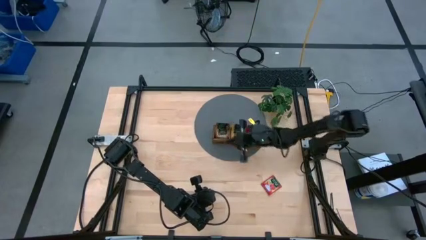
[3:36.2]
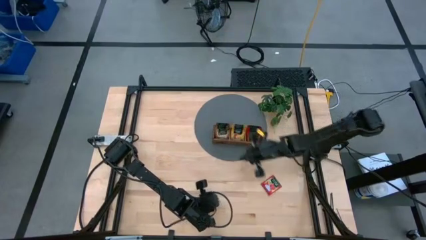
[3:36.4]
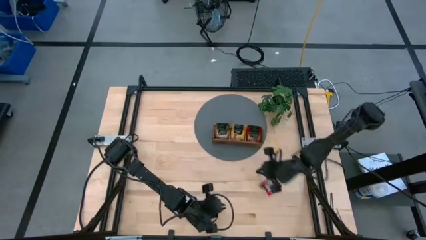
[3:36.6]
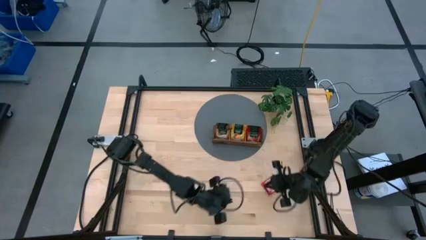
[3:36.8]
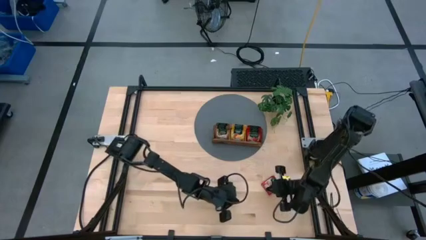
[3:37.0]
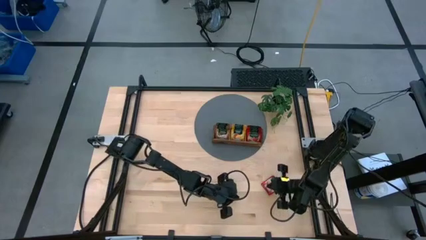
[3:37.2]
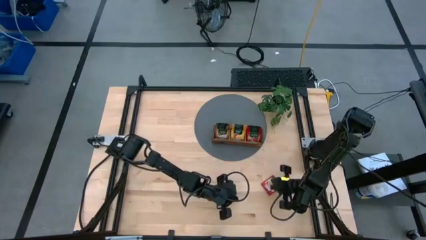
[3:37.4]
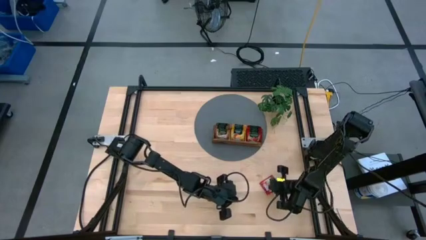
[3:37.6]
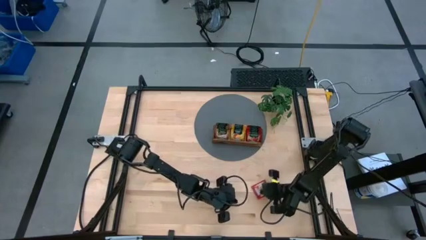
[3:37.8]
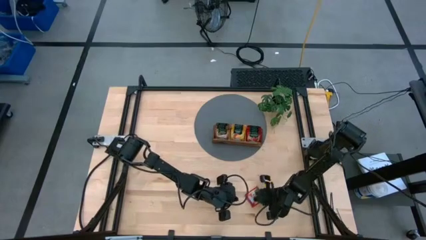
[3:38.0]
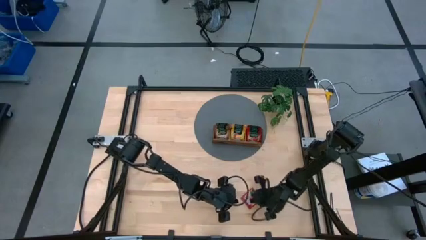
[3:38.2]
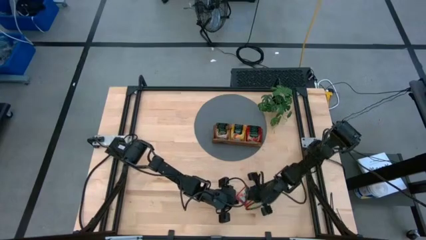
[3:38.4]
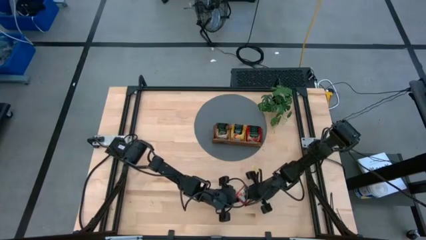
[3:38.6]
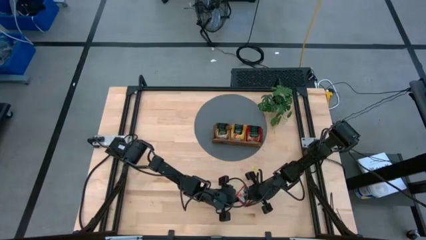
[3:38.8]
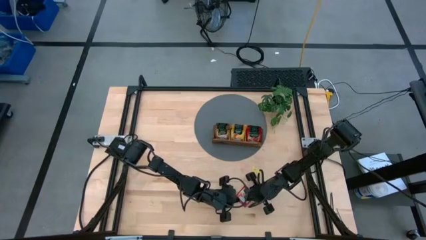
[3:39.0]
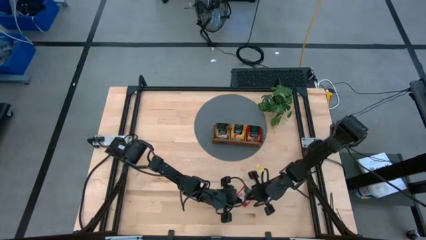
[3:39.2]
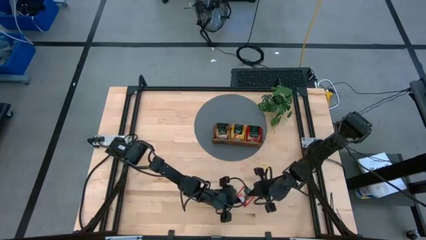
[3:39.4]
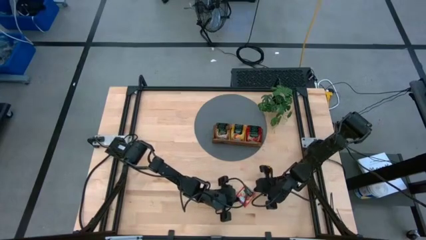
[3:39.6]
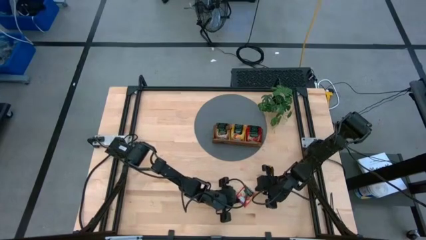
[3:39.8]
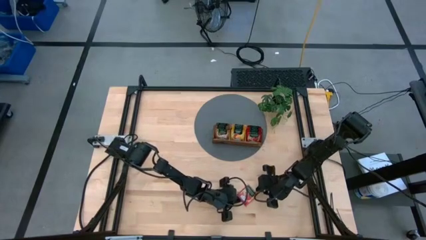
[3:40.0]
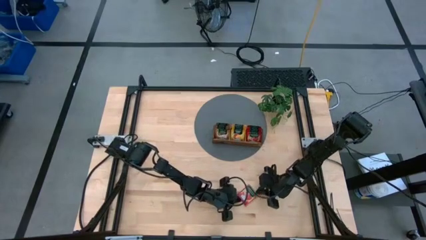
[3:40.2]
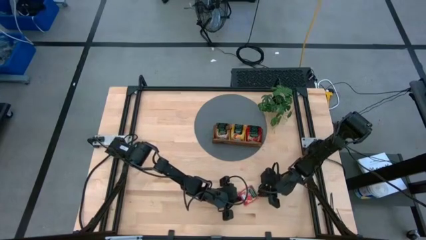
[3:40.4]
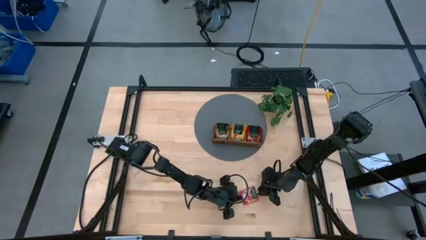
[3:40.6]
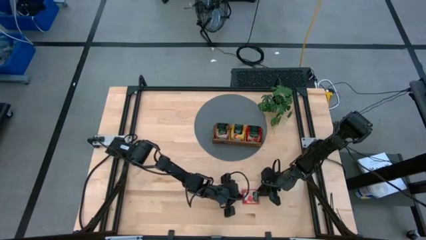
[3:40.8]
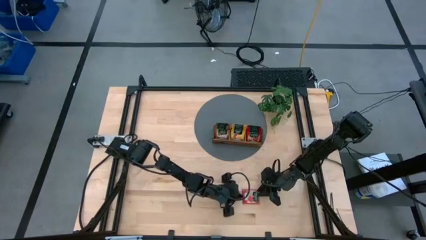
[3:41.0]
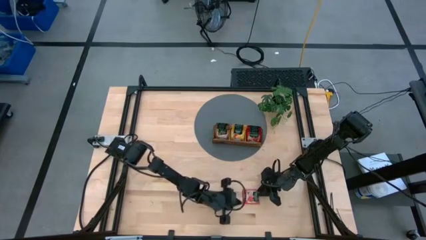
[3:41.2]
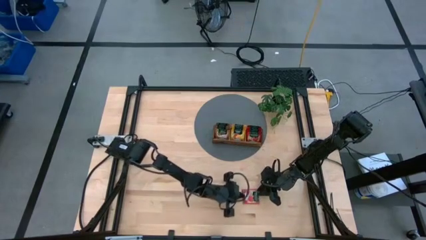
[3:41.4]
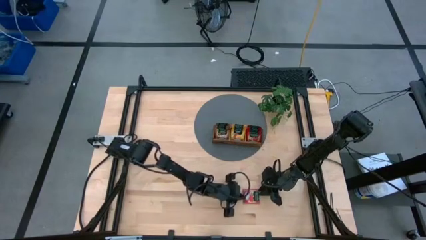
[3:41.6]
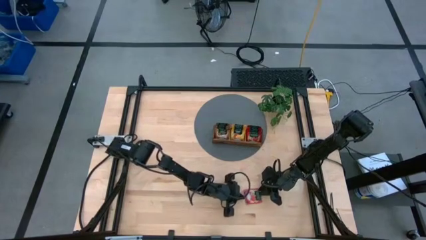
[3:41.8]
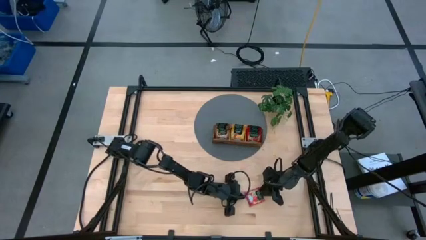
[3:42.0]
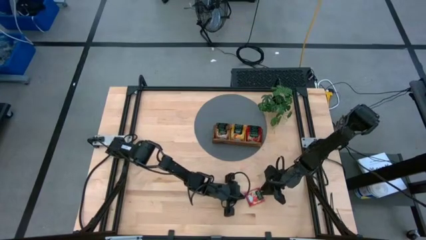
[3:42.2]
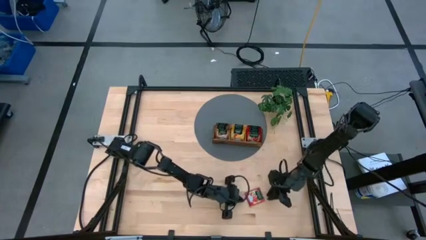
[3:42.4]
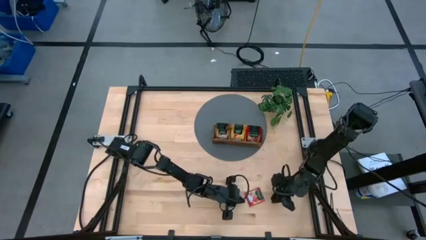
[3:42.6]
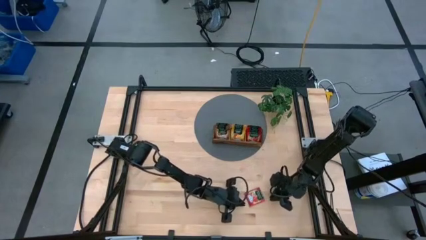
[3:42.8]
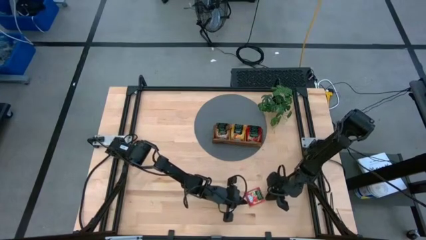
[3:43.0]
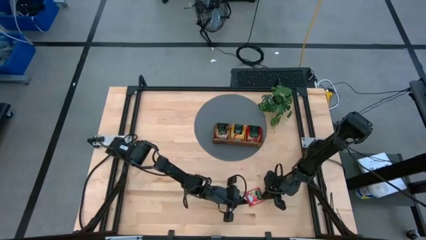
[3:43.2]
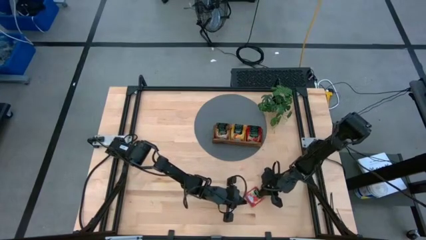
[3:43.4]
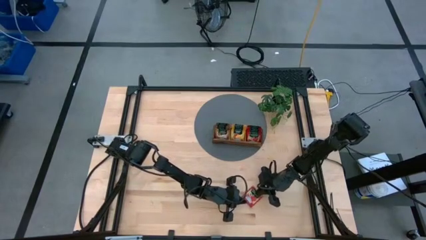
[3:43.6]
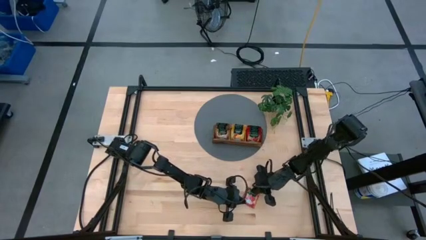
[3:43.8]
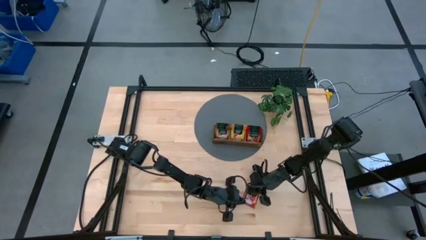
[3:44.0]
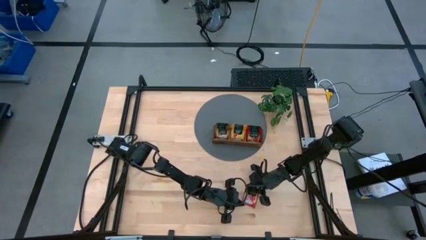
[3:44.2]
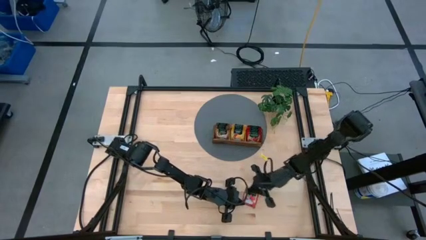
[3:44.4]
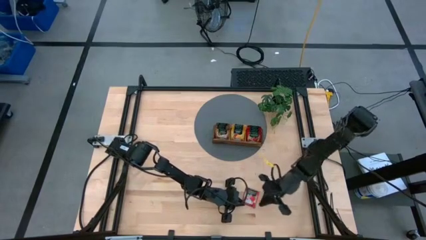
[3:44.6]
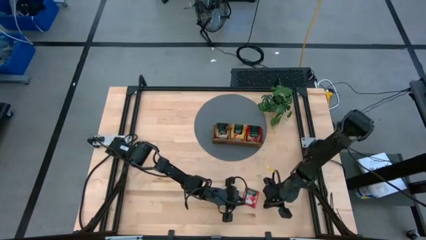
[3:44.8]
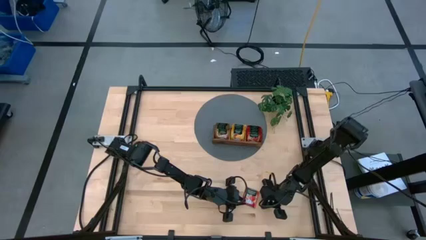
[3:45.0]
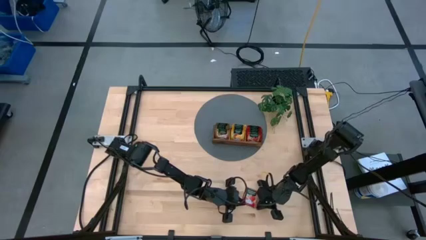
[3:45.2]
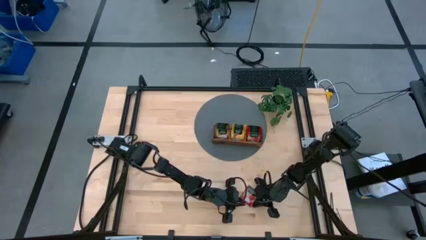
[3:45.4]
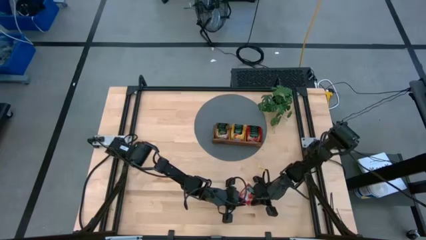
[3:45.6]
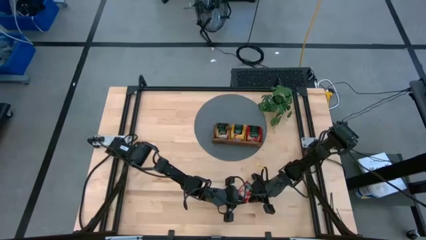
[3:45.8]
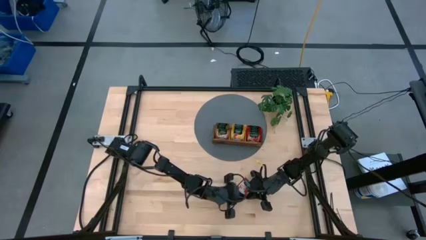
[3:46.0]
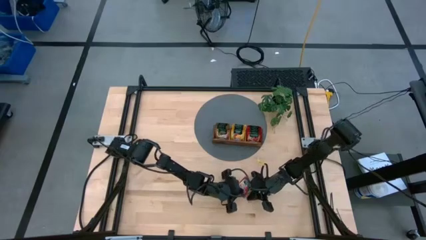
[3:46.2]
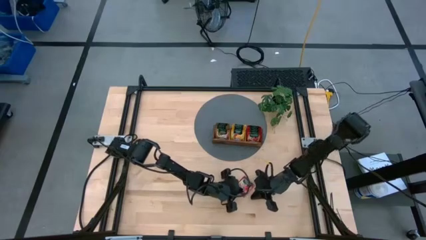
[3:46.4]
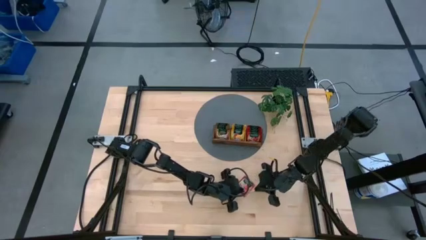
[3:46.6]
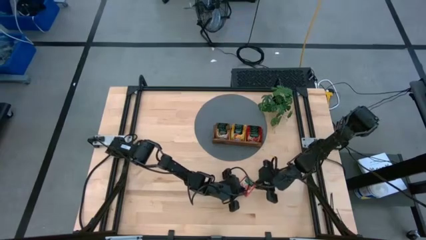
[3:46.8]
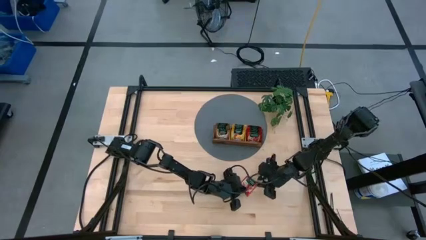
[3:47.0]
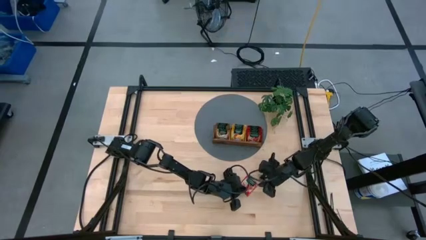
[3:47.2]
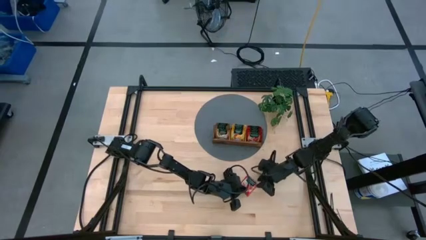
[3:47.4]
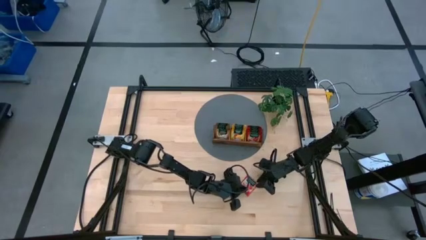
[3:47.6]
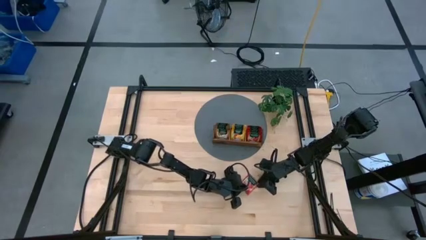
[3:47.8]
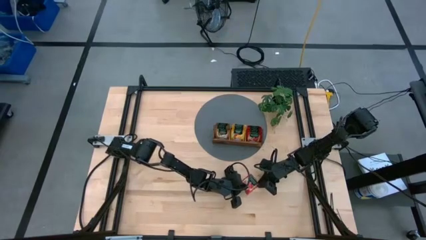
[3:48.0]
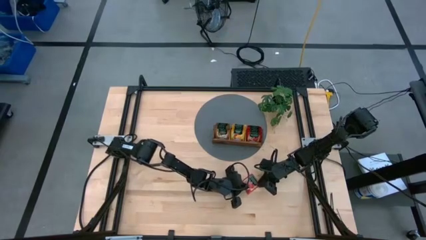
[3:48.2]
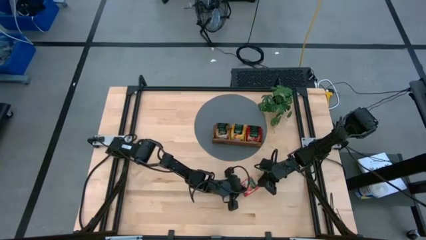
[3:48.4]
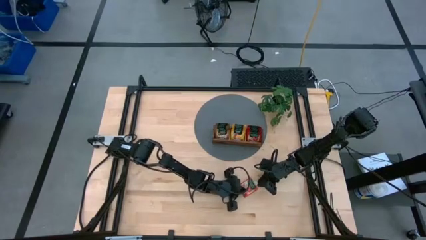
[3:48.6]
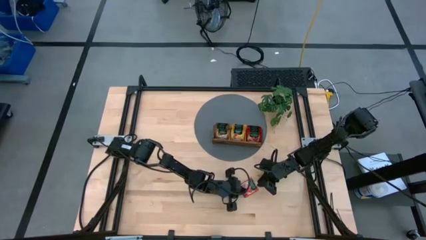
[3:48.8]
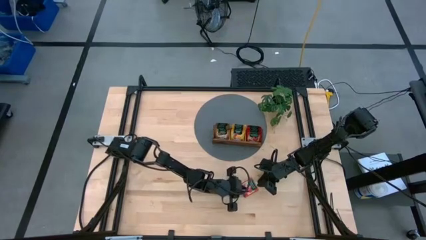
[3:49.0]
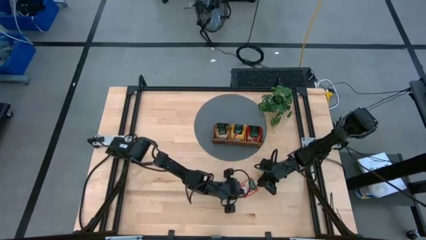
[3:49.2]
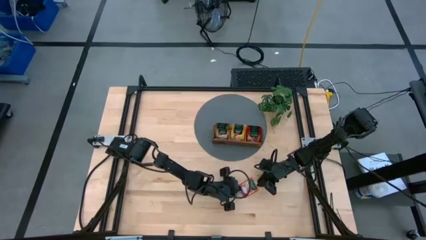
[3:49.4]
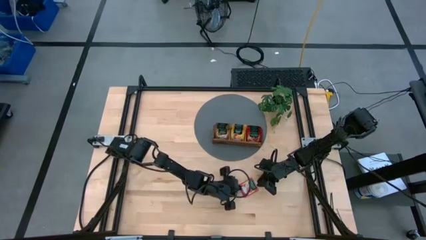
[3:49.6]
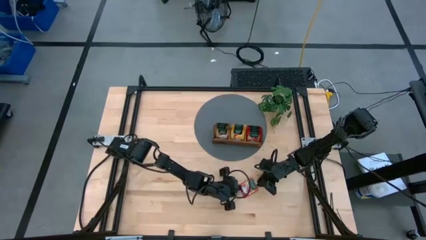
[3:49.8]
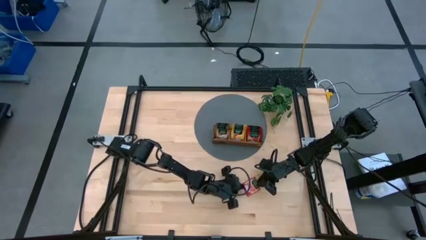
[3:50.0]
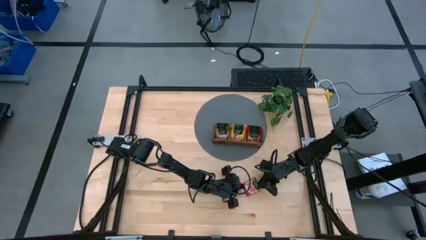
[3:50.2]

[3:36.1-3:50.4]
Task: Pick & Place Tea
Put the red tea bag into the right section of the wooden organizer
